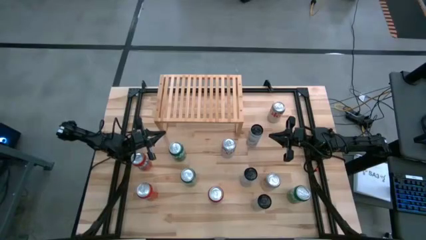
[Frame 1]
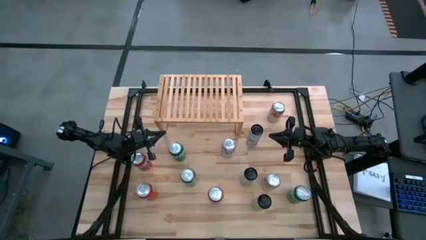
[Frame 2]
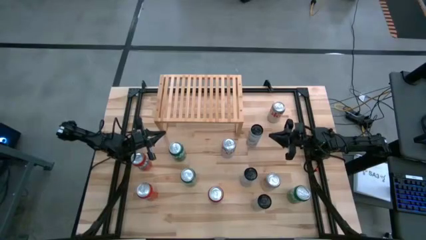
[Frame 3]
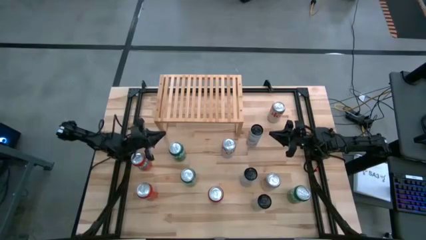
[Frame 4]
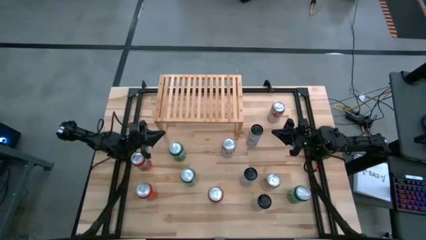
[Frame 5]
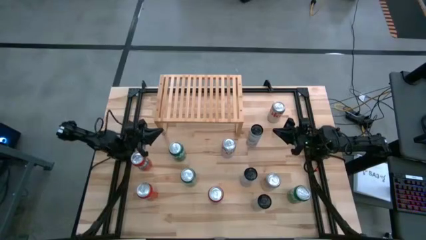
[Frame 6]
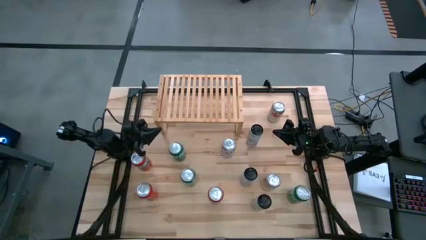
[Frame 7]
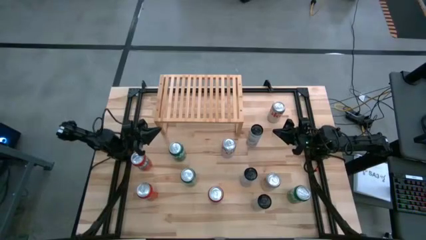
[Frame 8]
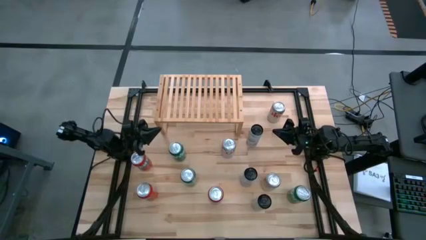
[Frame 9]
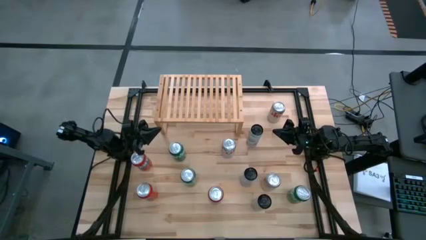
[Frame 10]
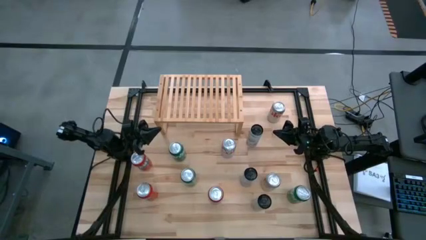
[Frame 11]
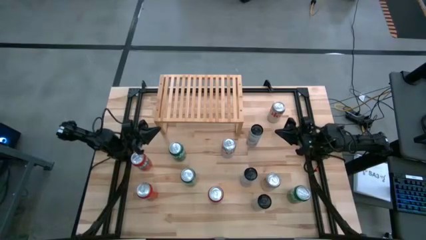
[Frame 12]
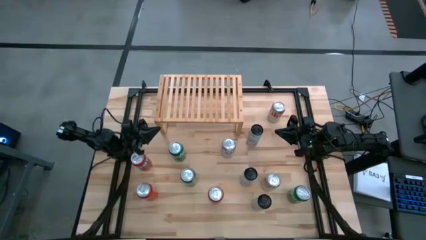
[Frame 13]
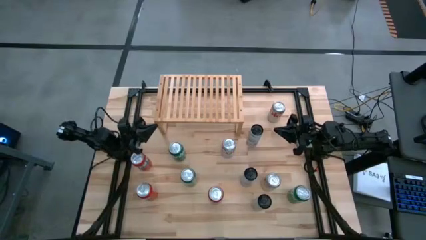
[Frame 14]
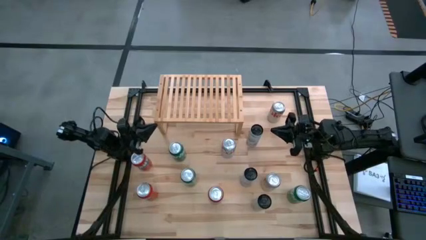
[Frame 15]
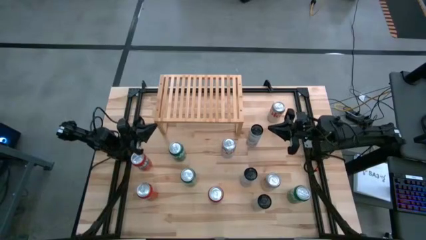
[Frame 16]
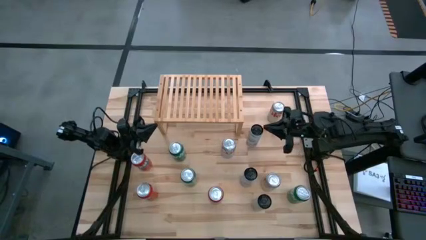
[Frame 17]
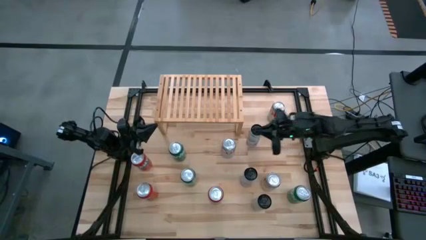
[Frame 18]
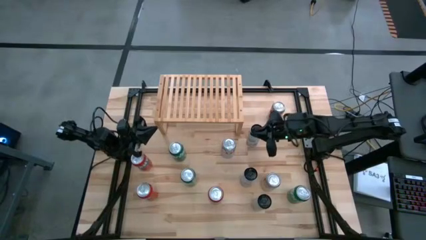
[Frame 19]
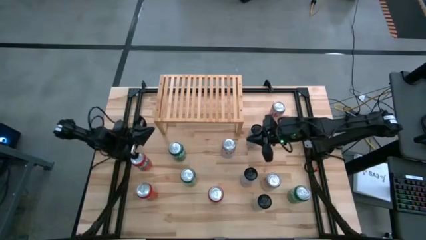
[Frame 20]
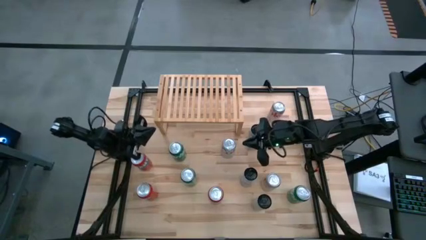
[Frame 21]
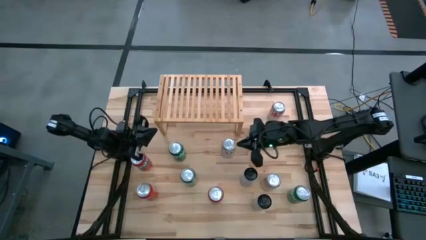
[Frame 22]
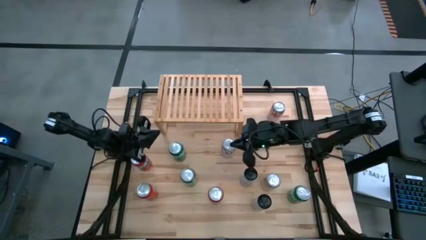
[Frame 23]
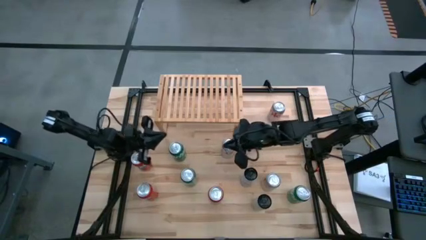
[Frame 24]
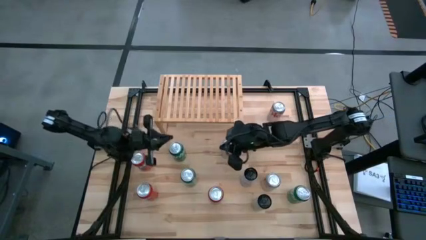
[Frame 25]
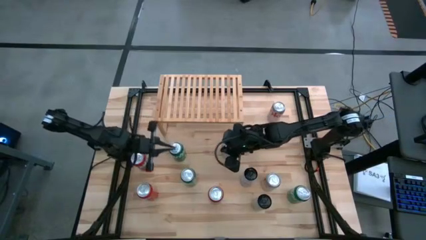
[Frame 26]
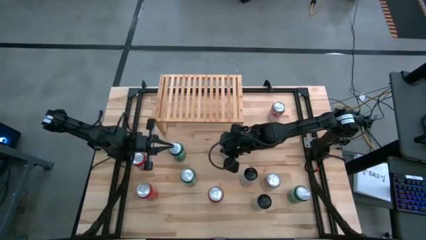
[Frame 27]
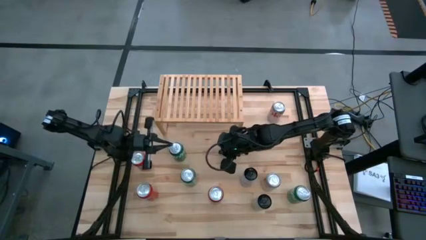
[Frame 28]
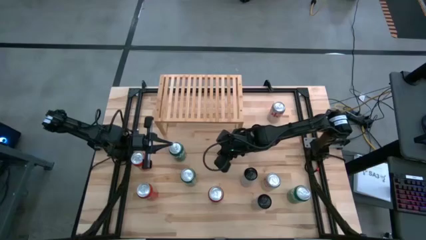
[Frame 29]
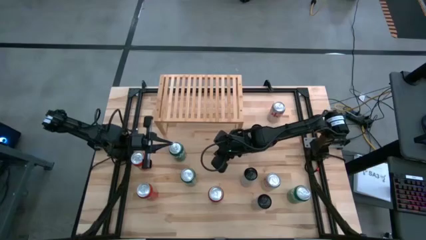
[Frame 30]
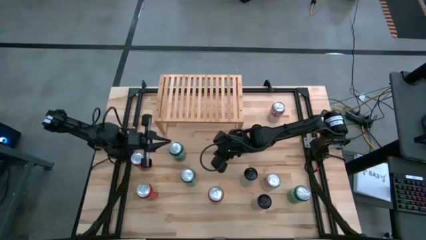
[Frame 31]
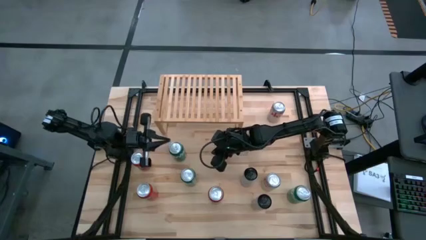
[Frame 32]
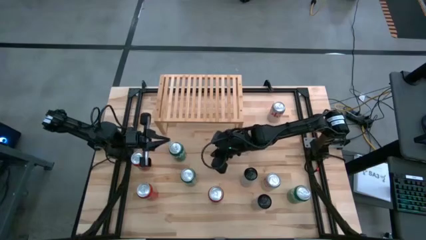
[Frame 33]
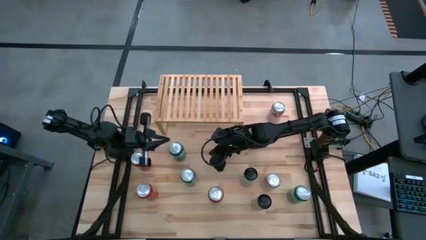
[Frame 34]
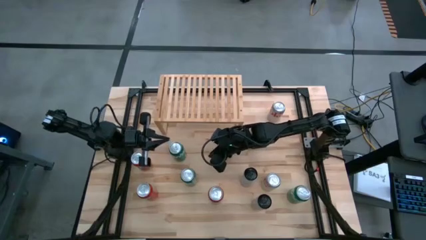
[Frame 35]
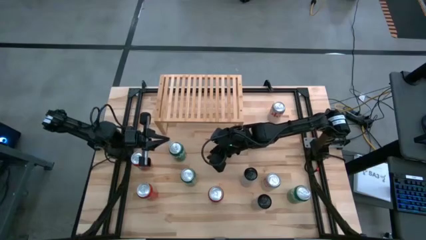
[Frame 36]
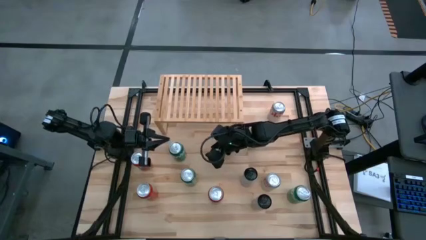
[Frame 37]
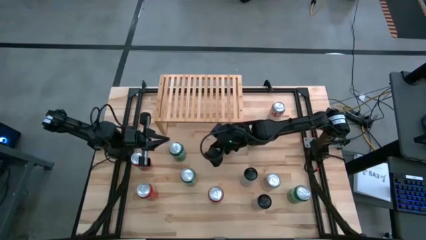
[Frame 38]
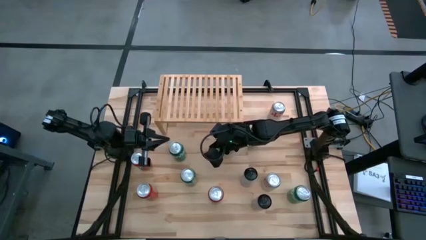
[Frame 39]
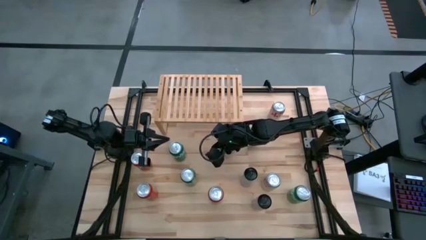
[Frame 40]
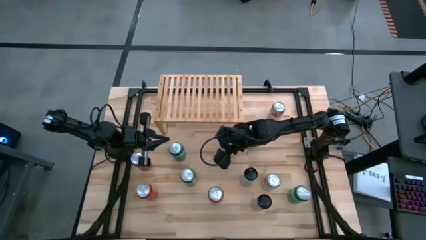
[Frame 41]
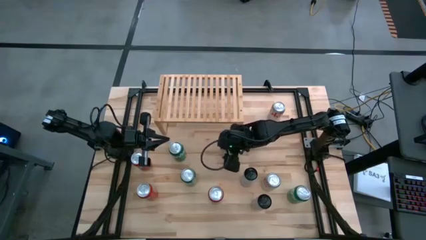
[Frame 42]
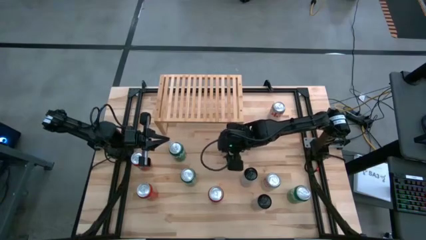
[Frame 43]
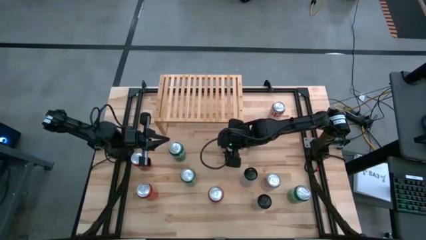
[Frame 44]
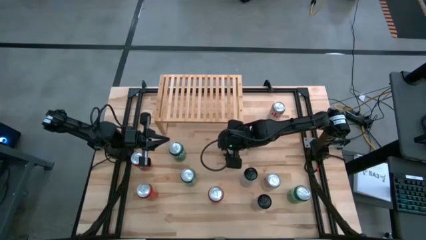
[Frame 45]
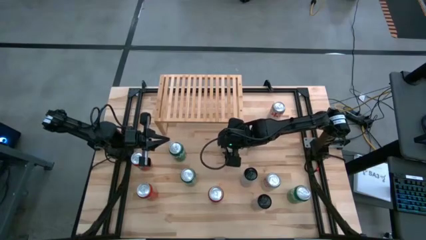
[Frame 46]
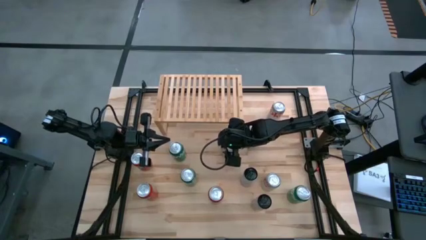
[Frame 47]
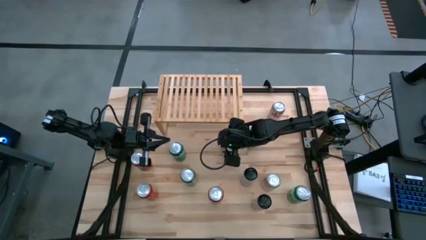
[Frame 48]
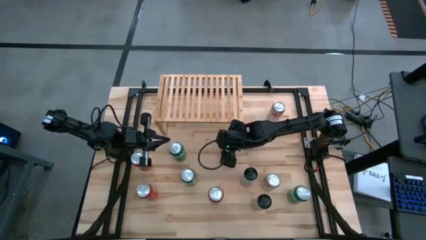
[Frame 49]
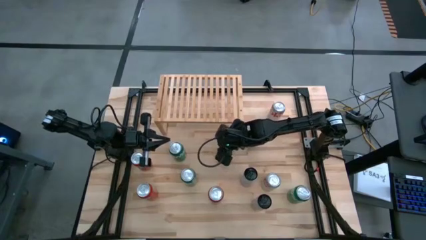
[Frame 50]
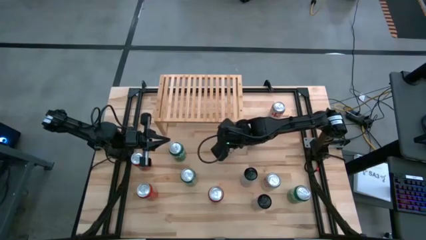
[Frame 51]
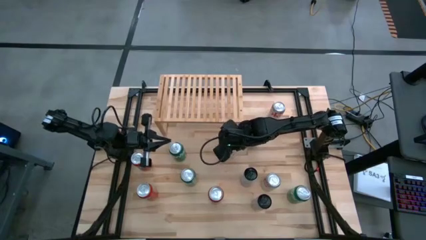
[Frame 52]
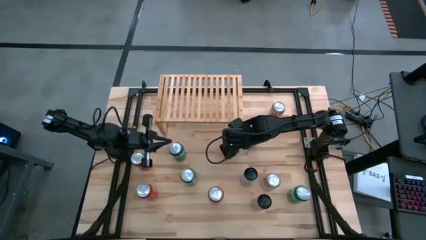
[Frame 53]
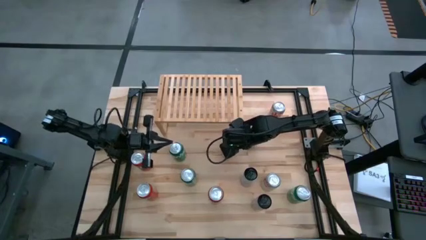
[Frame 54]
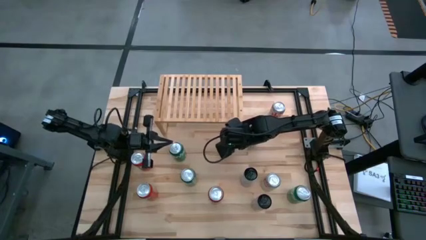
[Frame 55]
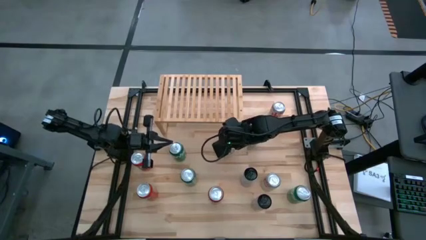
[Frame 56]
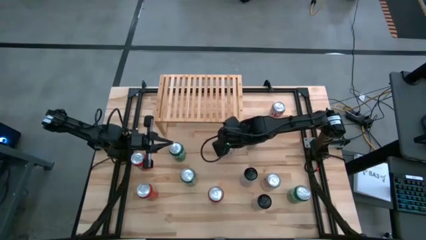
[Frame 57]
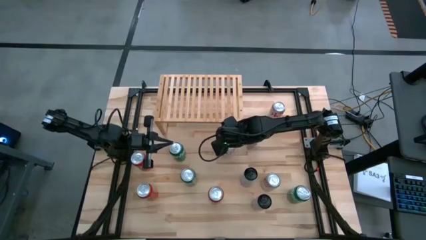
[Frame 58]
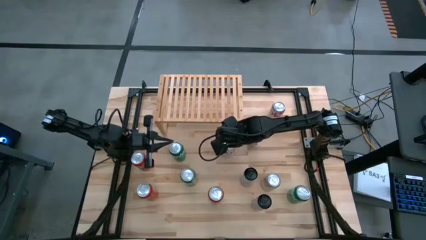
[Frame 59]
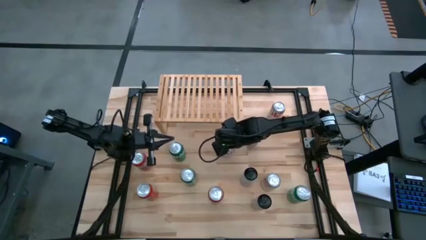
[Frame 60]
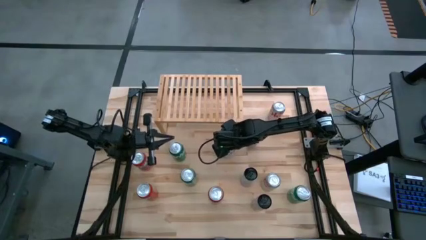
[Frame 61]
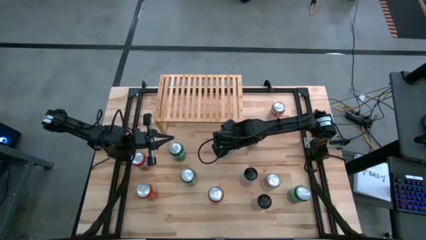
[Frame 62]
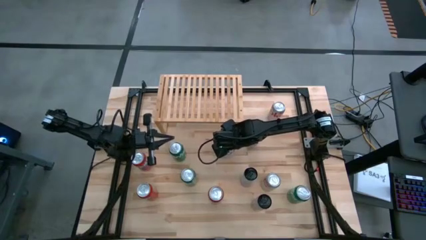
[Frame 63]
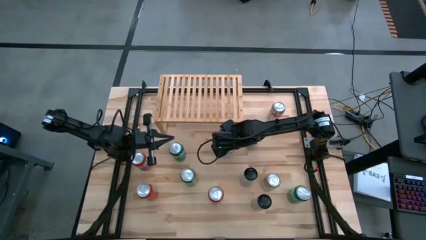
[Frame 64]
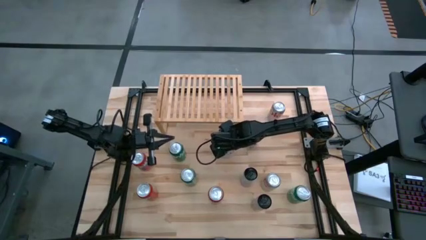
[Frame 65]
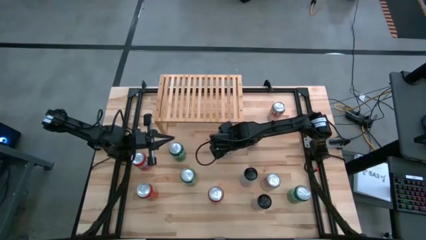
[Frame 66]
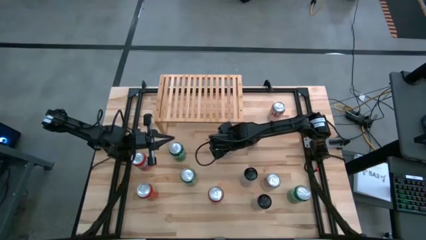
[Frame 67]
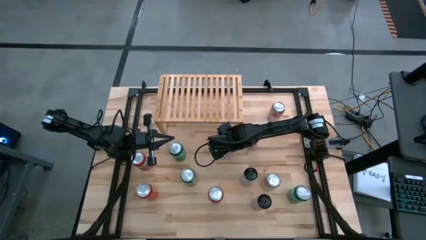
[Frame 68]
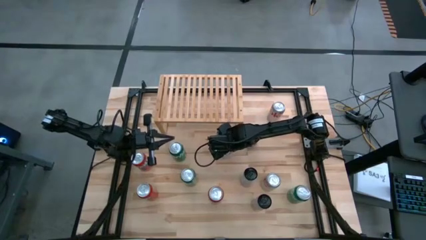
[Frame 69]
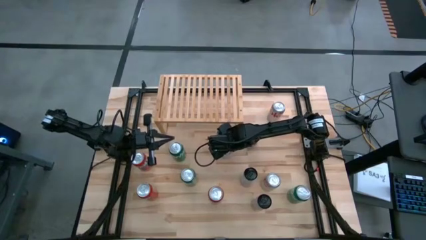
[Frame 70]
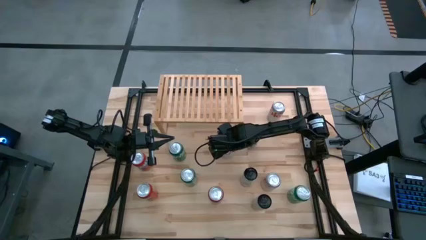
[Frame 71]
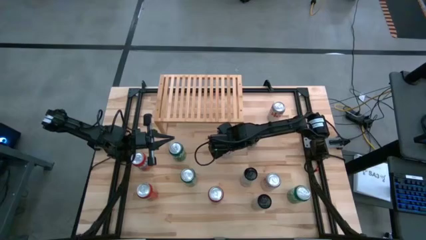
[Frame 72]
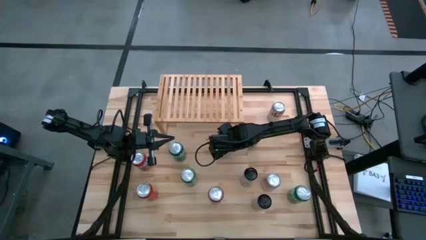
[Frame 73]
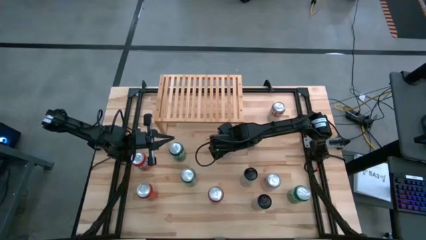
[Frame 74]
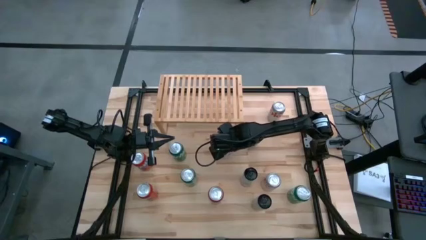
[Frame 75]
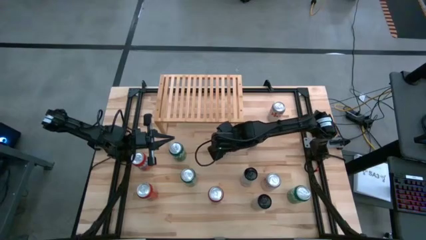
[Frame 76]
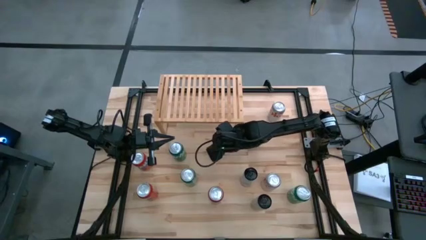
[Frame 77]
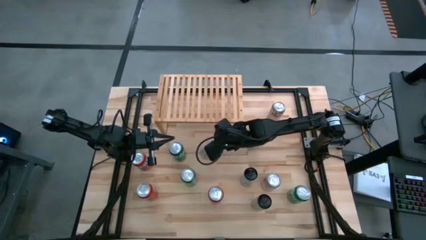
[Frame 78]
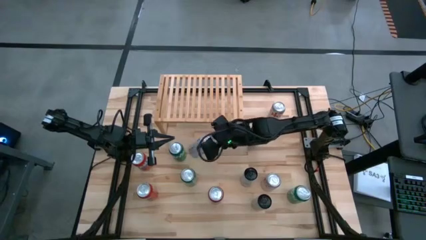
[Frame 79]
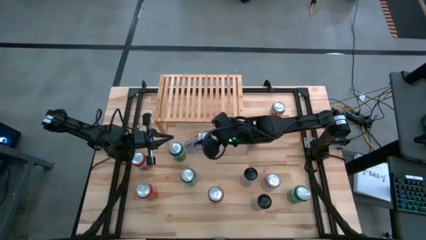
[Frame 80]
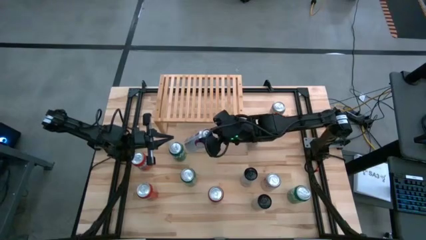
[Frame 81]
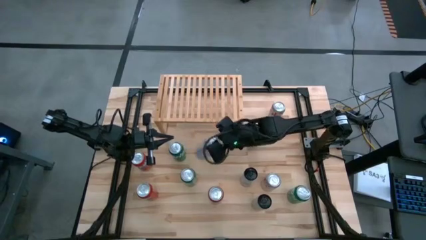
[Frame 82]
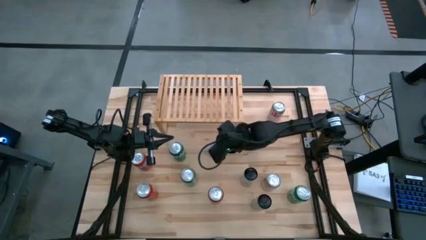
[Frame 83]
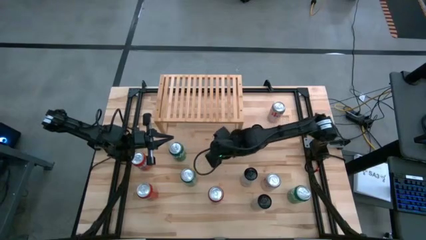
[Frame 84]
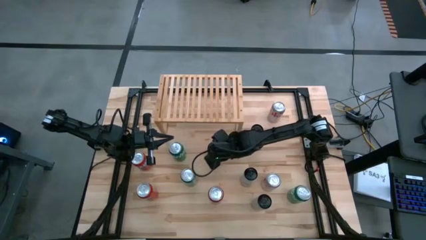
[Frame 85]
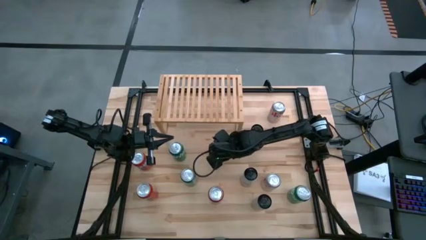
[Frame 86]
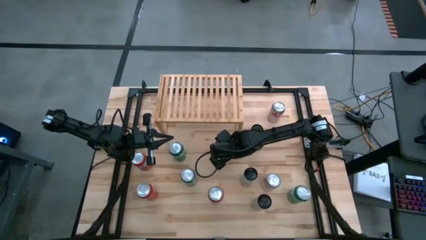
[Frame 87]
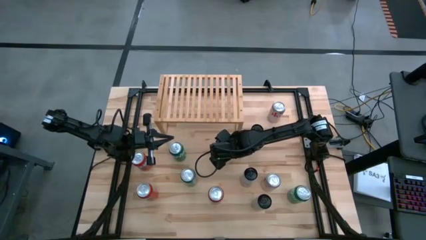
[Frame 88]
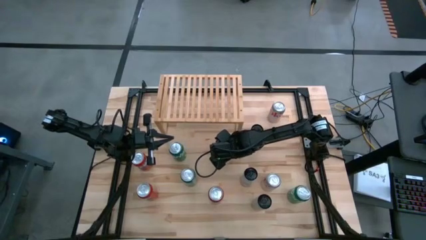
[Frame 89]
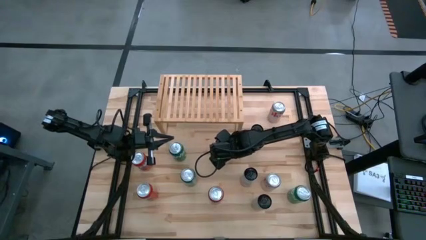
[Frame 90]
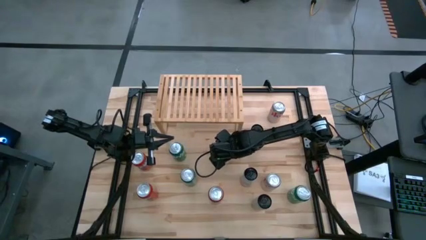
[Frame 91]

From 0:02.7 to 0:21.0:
Task: Place canned beverage on shelf
Put the middle white soda can on the shelf
